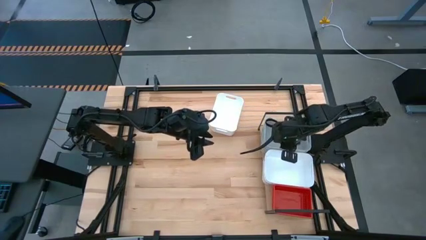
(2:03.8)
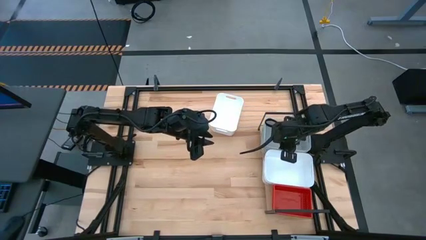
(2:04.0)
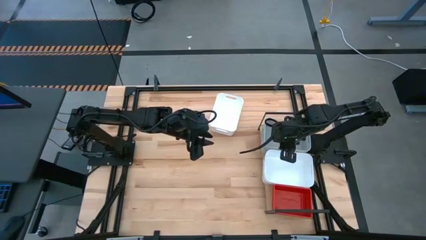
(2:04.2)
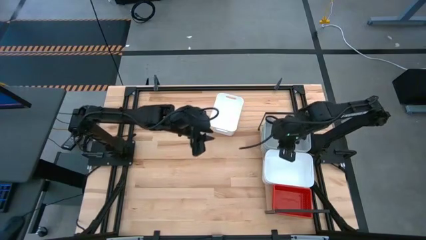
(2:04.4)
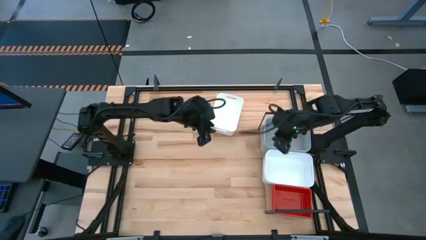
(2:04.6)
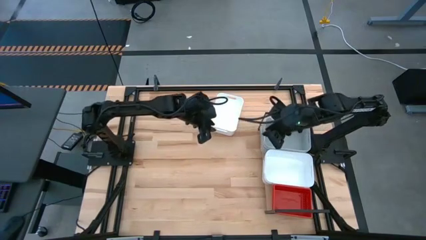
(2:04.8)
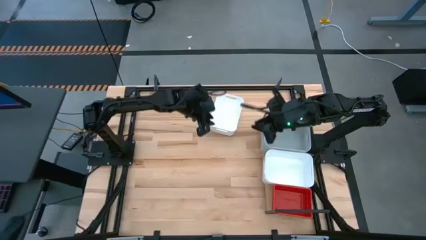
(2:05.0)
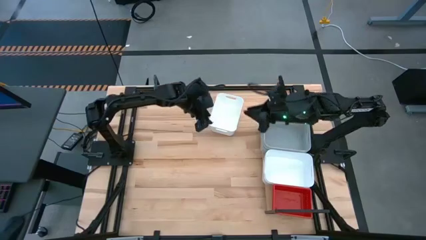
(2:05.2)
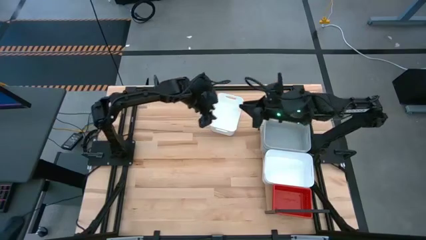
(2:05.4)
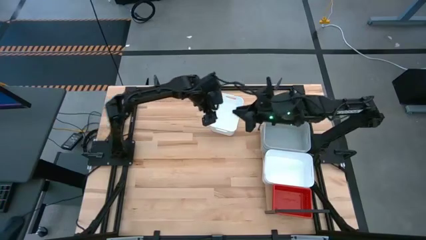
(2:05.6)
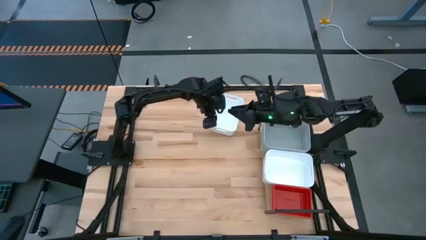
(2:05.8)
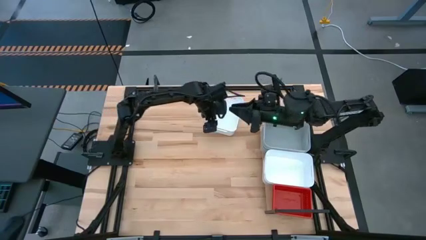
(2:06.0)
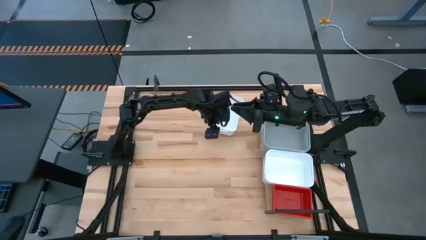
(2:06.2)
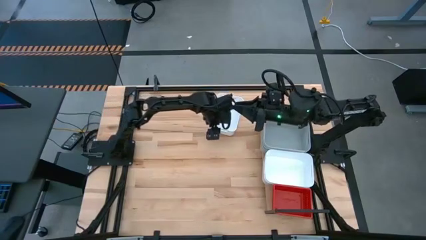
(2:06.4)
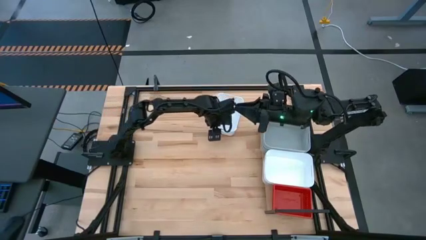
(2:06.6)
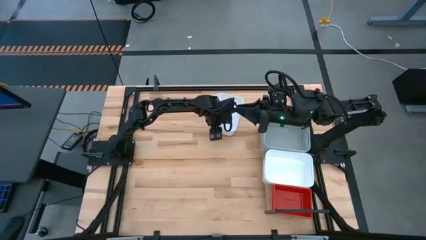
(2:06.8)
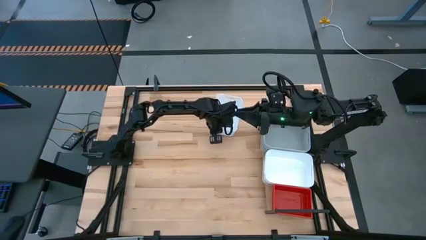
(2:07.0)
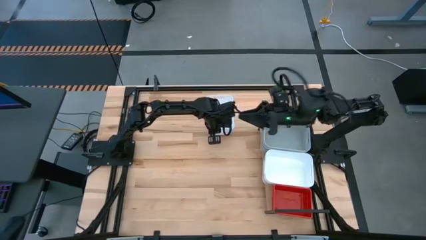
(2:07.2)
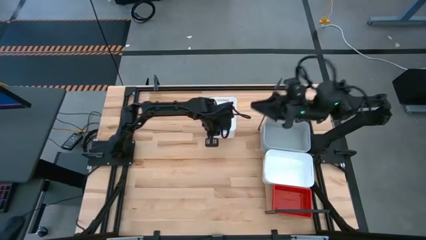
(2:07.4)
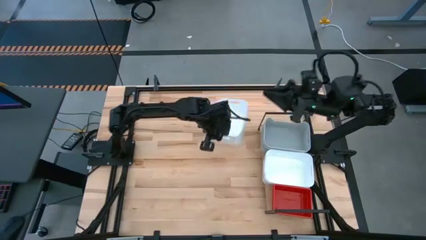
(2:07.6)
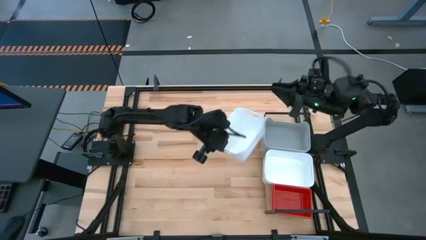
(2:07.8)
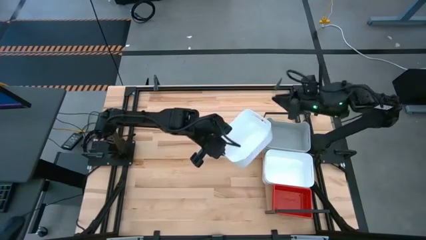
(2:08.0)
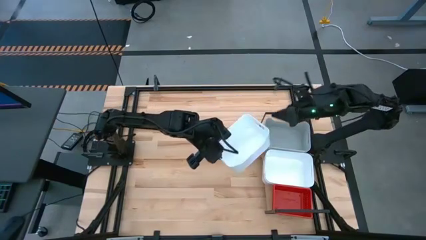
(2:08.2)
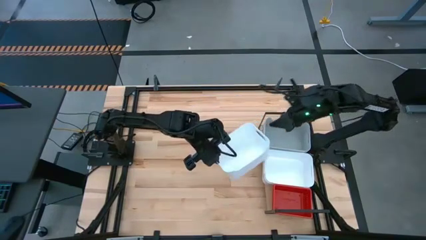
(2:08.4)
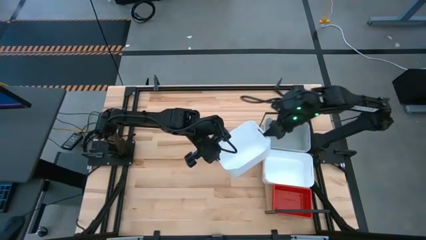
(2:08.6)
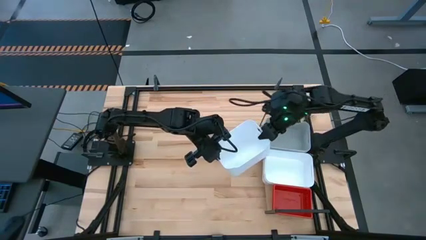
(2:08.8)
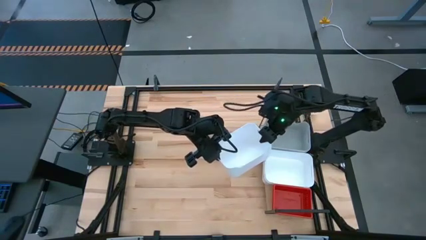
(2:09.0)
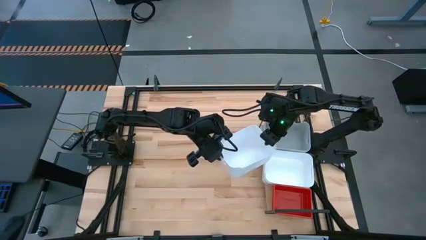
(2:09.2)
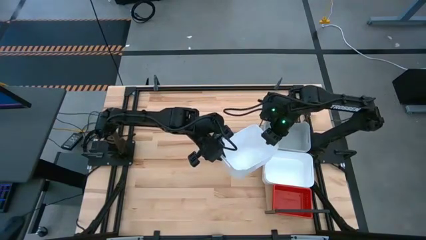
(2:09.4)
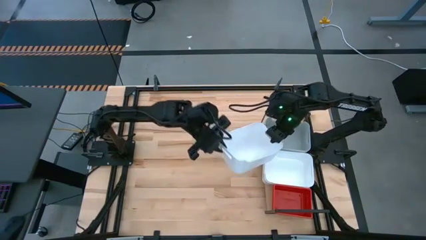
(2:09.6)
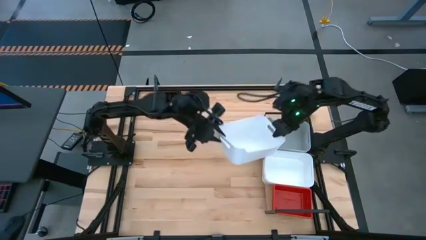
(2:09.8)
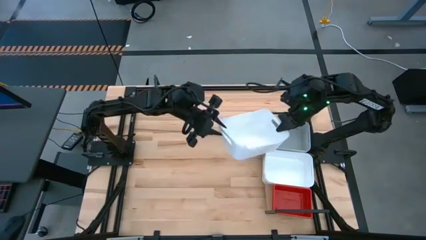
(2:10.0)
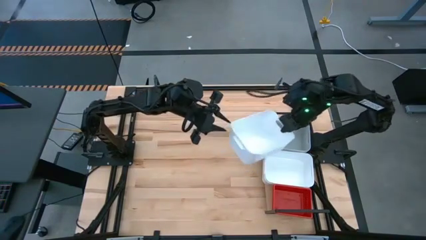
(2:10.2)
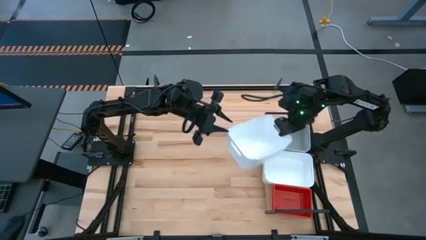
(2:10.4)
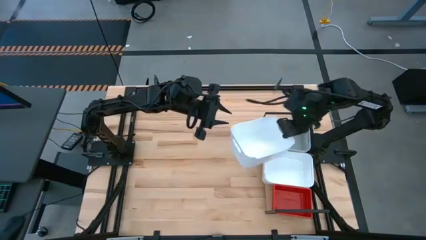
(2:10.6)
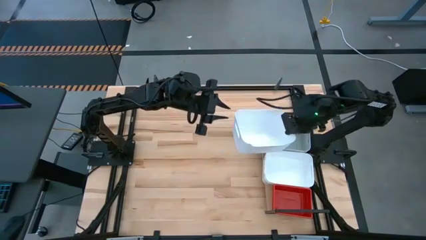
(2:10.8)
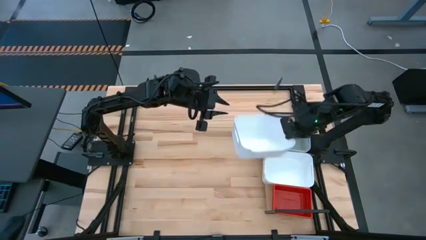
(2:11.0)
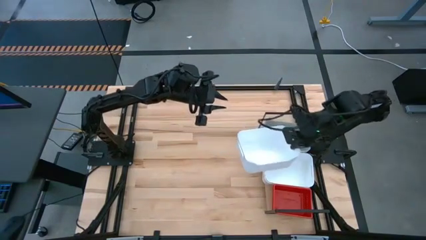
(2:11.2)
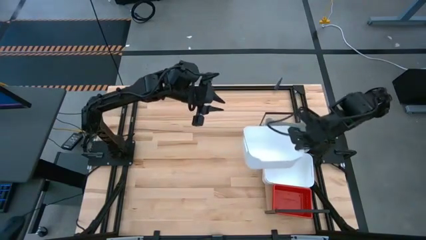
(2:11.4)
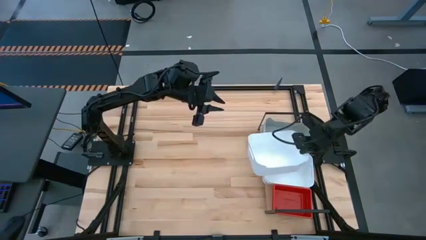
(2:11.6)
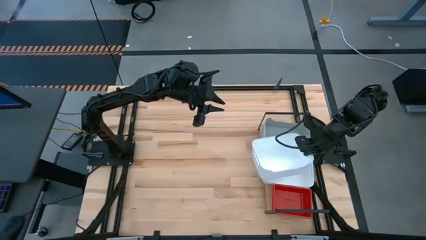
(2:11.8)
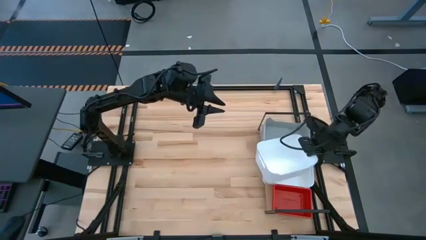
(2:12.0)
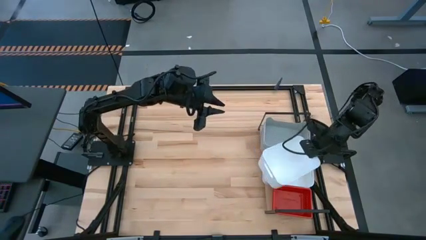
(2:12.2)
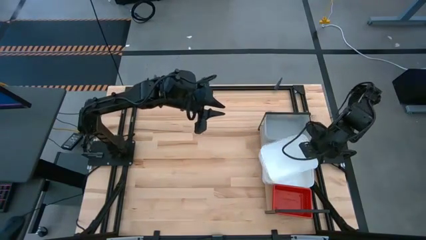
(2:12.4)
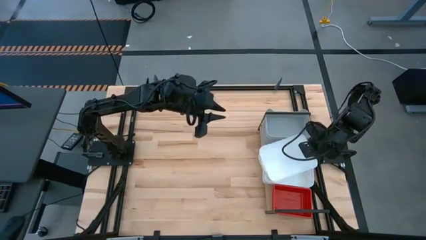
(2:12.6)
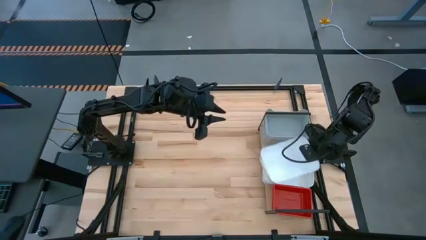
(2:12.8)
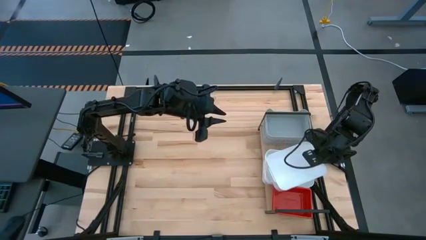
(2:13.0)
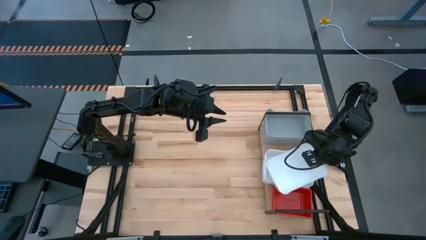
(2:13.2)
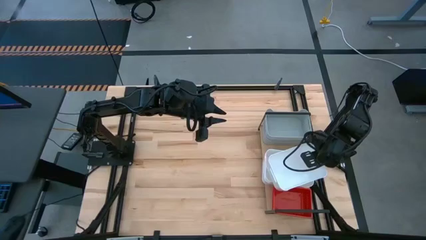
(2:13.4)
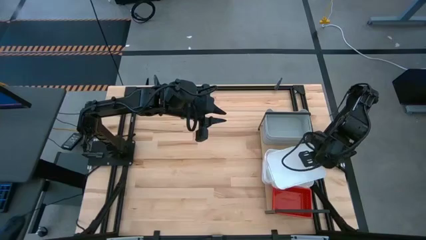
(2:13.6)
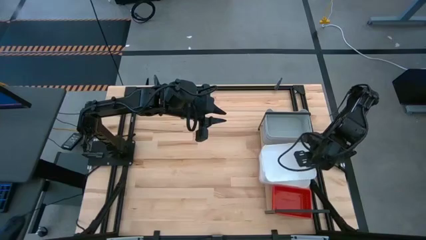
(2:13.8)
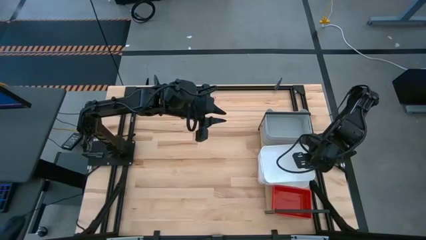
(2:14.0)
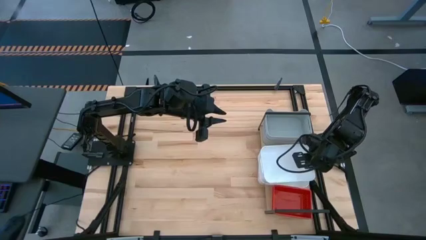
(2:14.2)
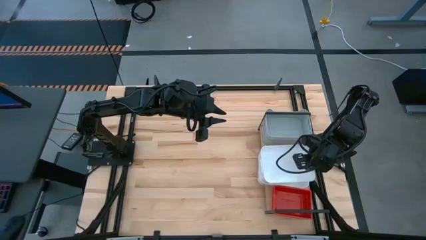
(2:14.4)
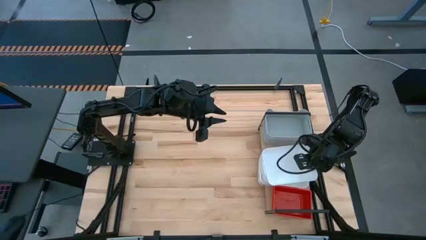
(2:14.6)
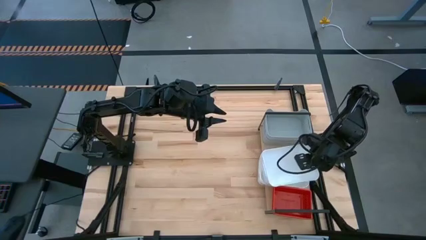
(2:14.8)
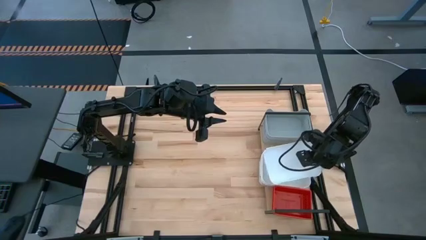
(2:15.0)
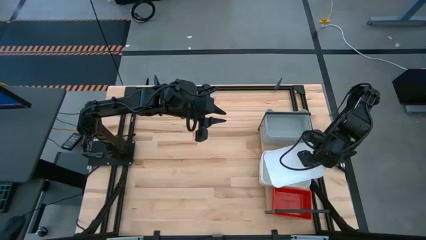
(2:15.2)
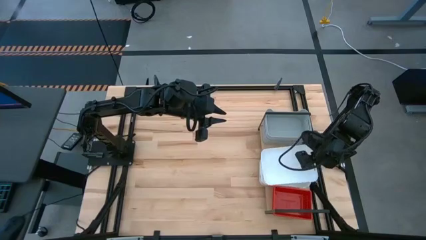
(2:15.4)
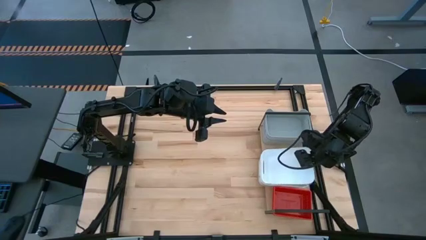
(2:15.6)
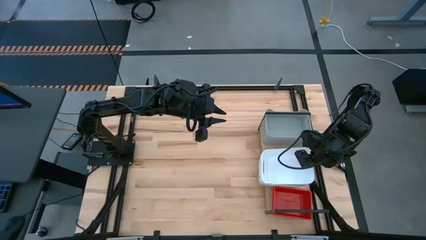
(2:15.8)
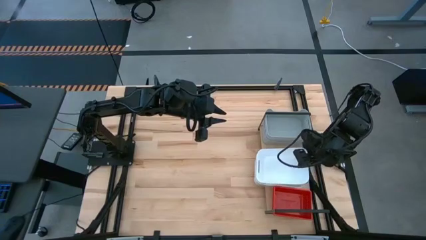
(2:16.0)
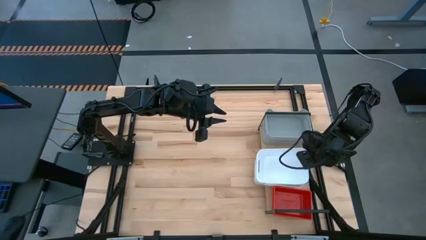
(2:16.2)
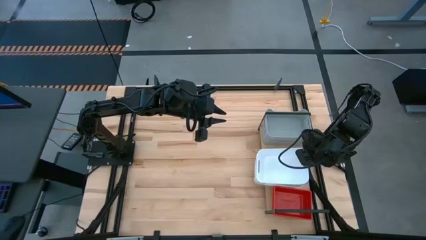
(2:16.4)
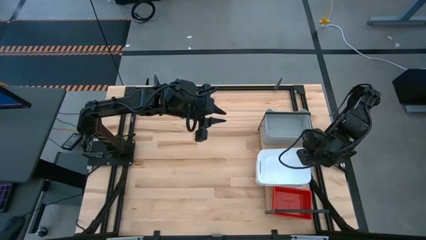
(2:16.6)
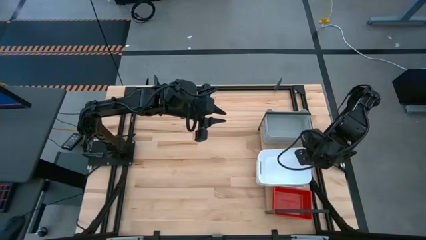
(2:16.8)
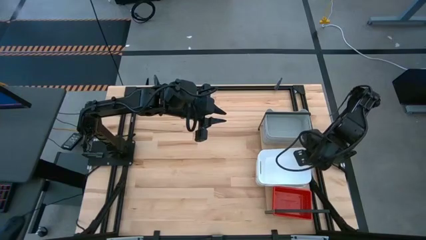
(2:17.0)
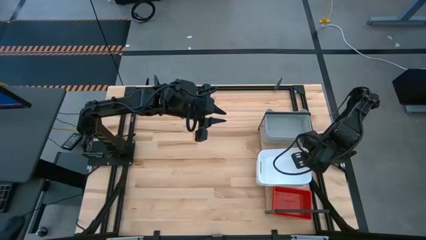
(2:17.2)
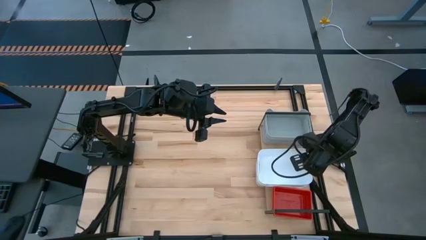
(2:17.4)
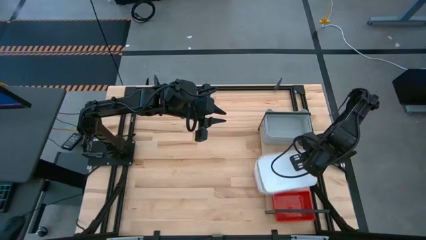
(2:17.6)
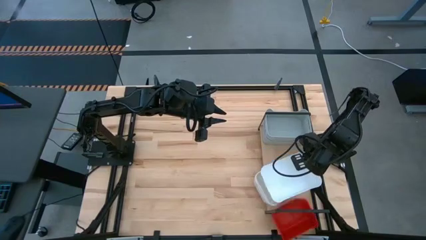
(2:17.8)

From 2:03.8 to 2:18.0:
Task: Stack baskets on shelf by color
Stack the white bin on top of the white bin on the shelf
